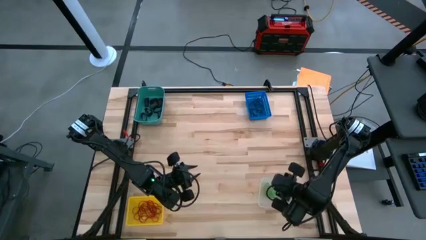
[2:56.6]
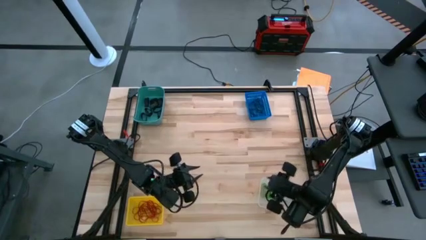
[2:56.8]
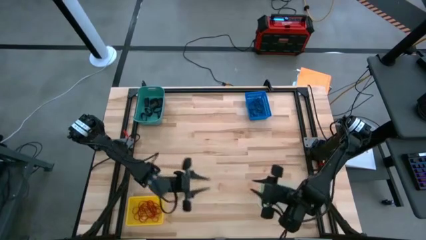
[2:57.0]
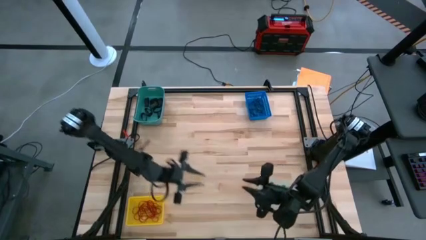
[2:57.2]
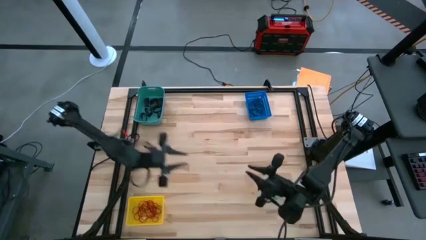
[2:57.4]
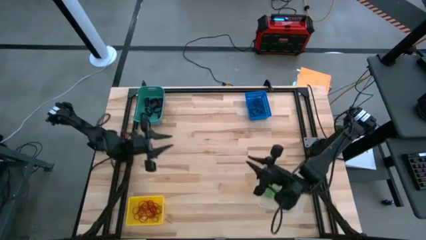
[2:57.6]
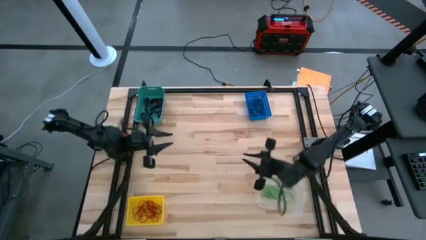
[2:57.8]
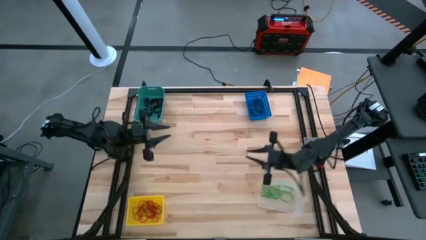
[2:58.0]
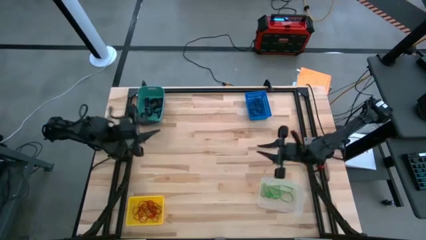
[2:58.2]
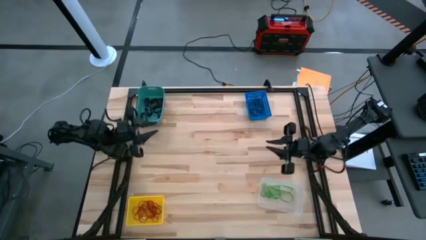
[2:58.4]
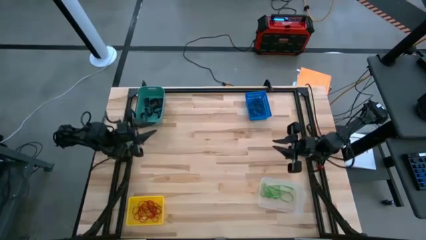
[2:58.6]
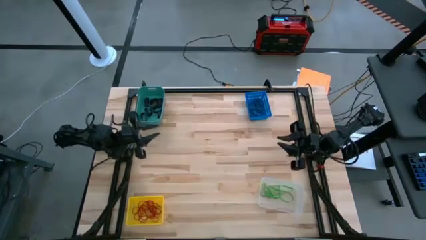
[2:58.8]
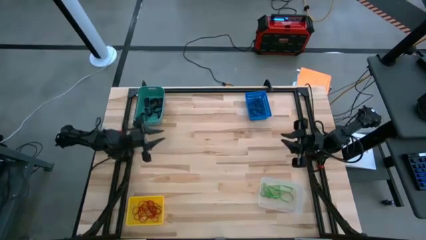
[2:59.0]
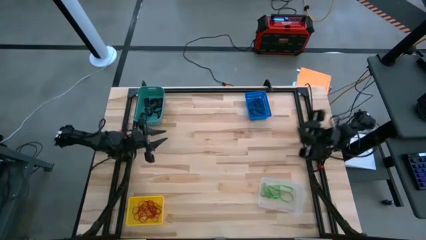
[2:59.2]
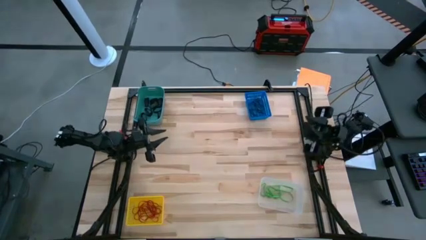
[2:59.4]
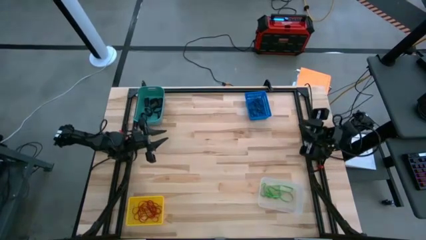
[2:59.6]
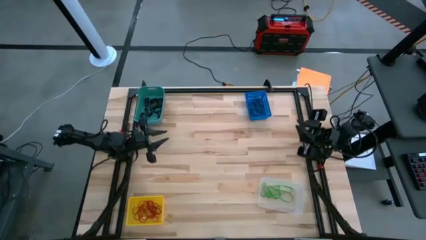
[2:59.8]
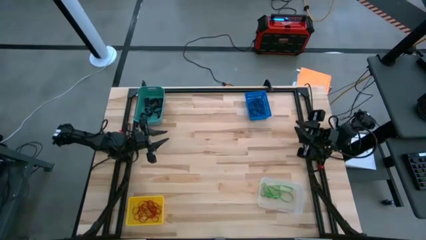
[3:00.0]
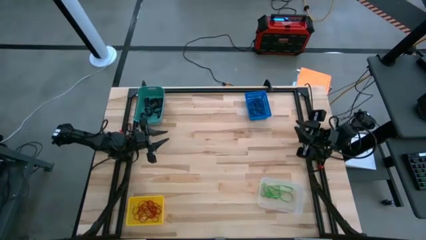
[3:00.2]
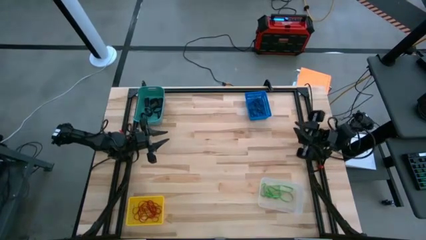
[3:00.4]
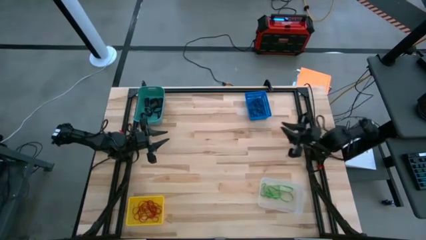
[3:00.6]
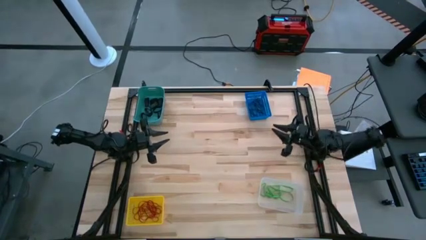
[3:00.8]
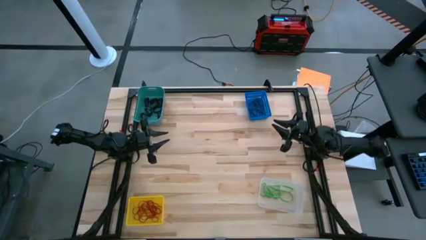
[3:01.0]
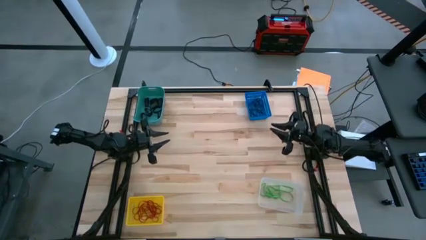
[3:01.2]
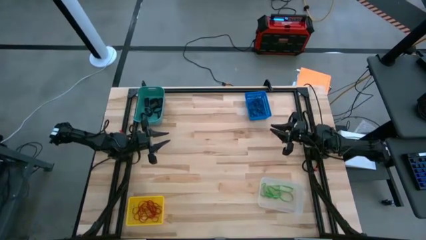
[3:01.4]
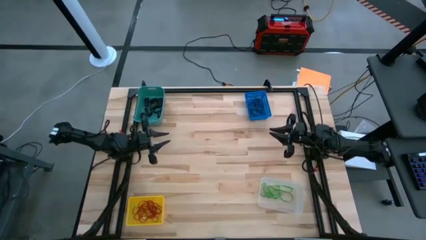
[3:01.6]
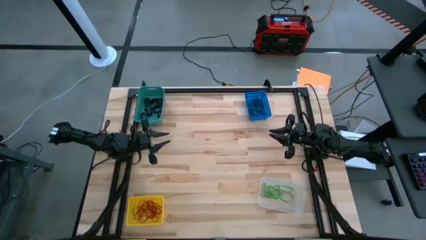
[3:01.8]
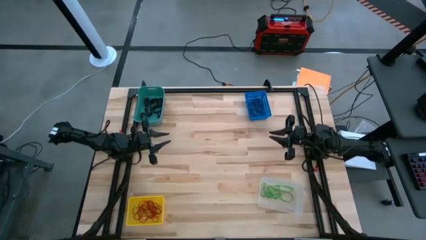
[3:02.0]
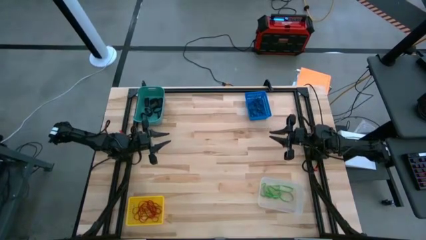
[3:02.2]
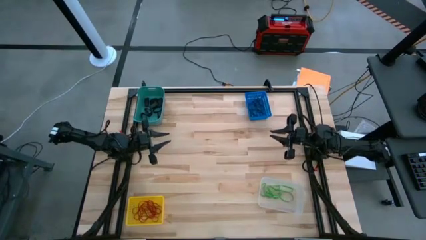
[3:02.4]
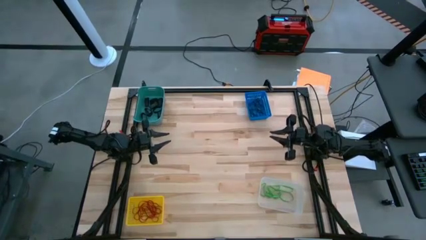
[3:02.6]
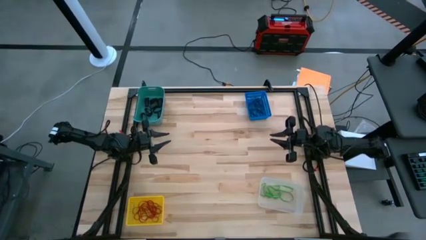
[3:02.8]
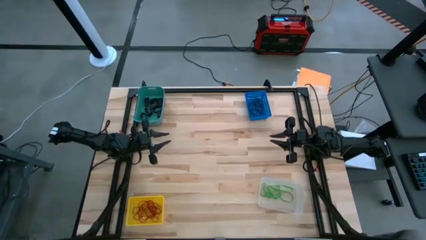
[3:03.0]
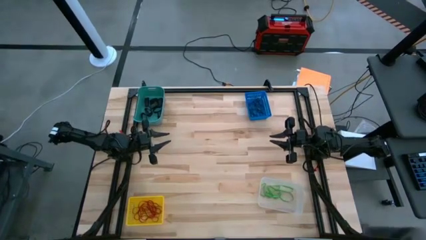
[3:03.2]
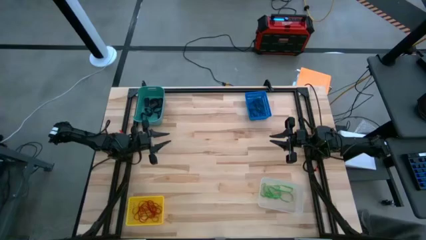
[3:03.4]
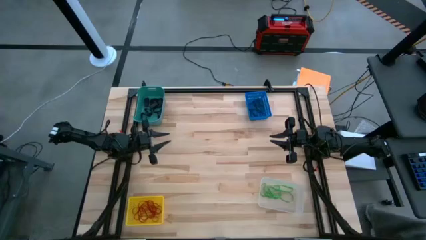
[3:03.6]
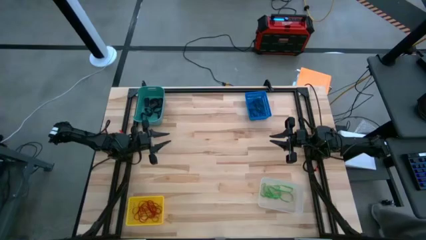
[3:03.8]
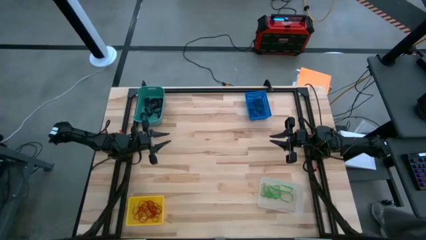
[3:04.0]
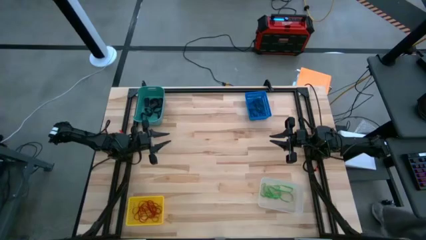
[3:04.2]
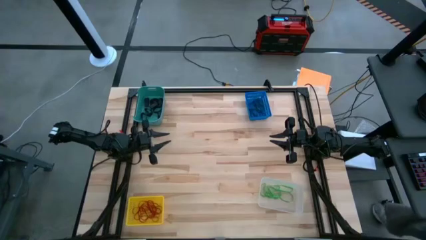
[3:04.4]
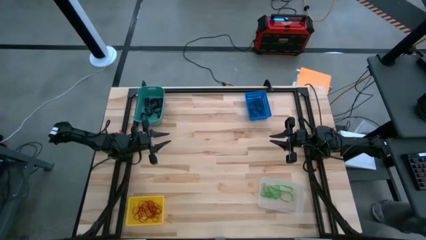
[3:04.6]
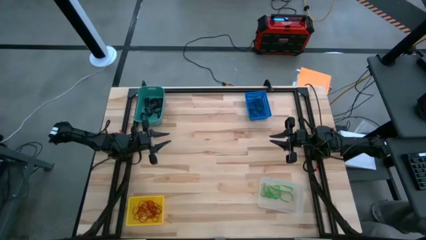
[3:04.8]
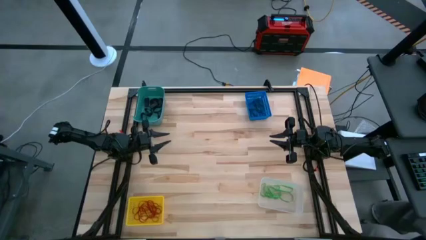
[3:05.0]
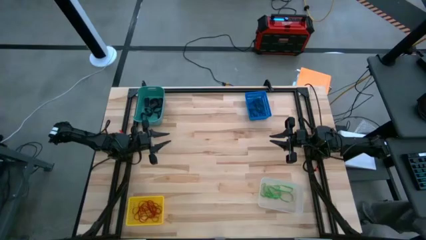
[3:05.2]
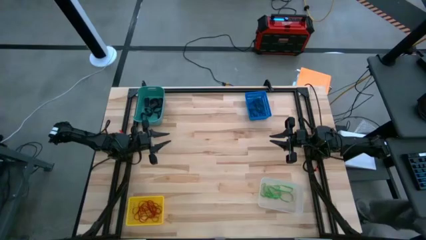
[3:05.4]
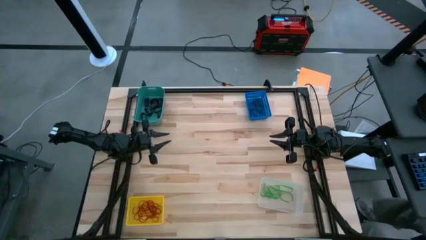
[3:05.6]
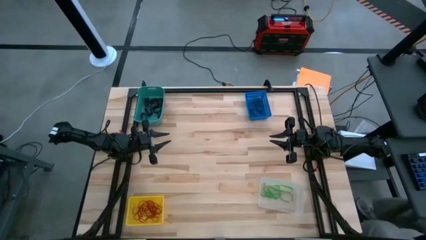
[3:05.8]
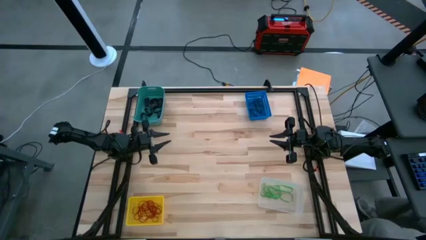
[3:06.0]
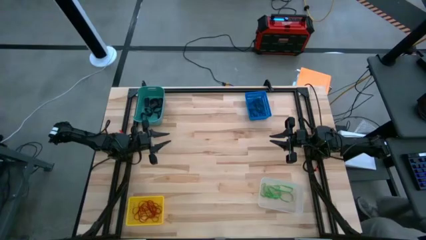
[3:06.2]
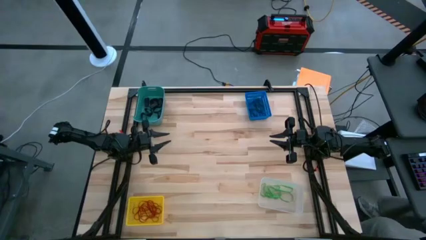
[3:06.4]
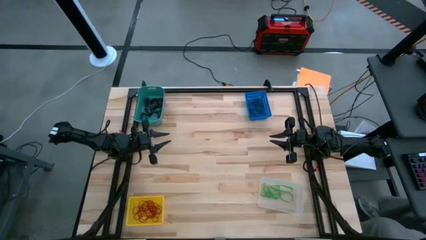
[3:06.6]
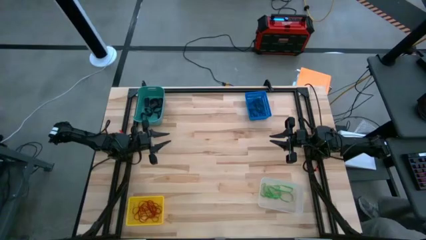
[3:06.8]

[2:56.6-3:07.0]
Task: Sort rubber bands into baskets
Return to Home Position
